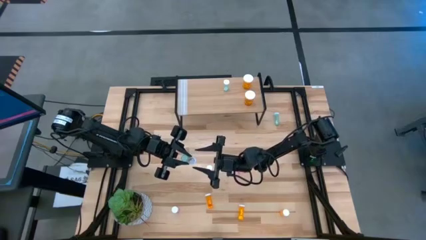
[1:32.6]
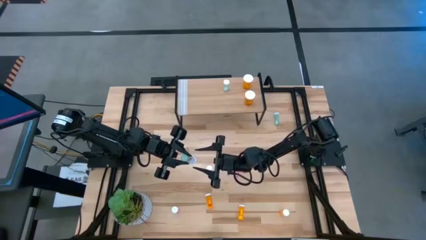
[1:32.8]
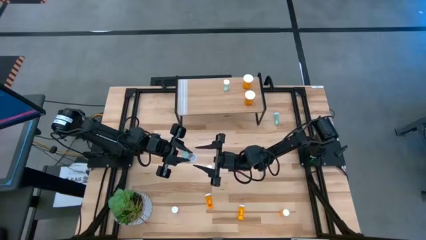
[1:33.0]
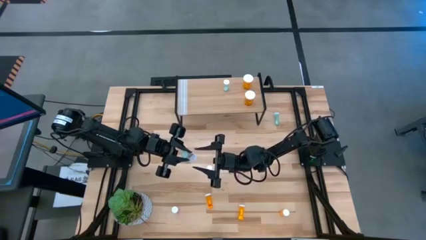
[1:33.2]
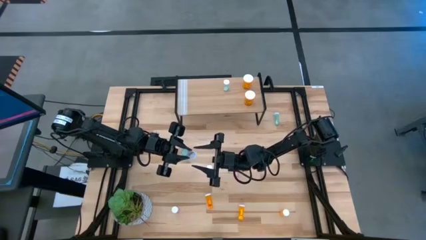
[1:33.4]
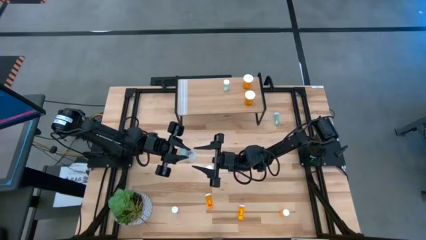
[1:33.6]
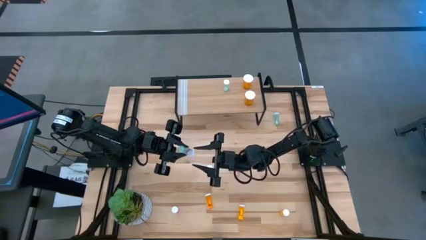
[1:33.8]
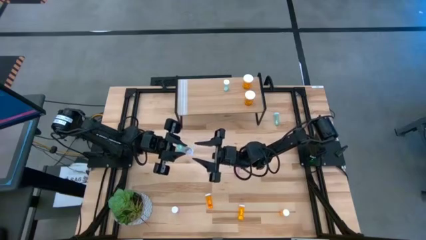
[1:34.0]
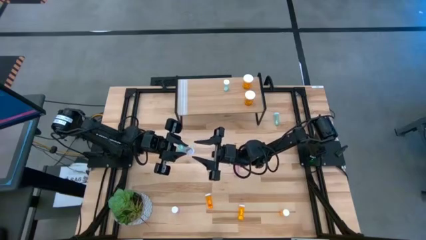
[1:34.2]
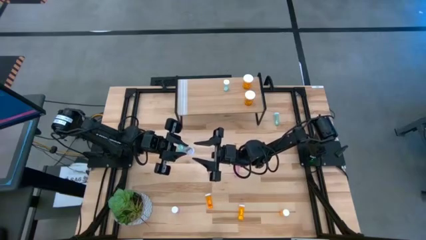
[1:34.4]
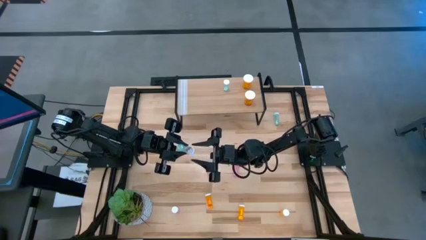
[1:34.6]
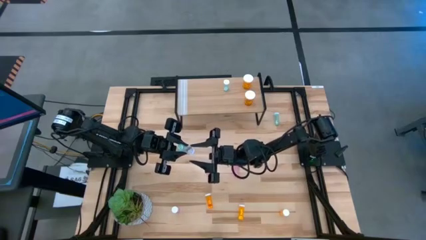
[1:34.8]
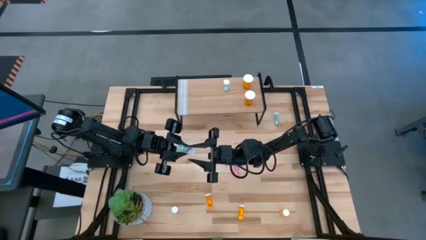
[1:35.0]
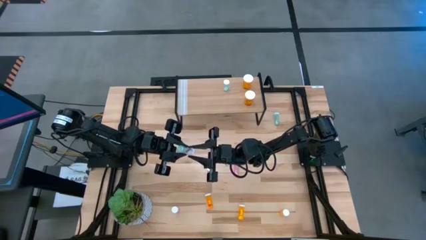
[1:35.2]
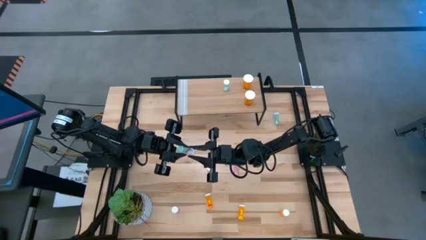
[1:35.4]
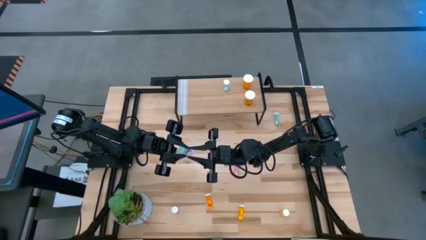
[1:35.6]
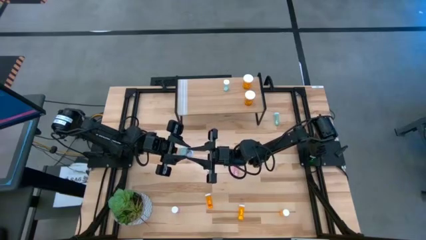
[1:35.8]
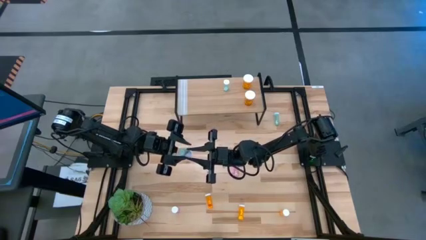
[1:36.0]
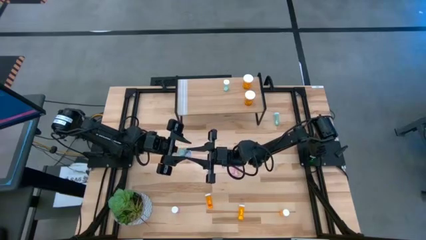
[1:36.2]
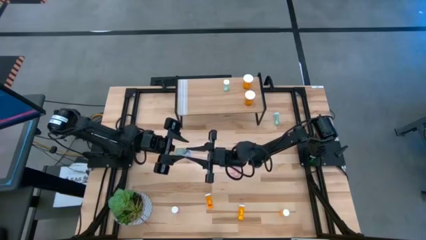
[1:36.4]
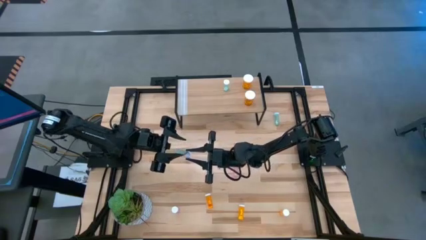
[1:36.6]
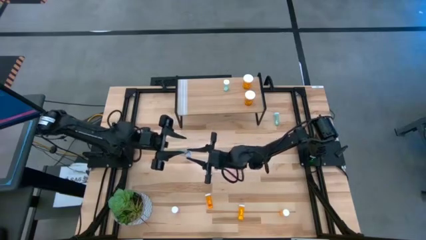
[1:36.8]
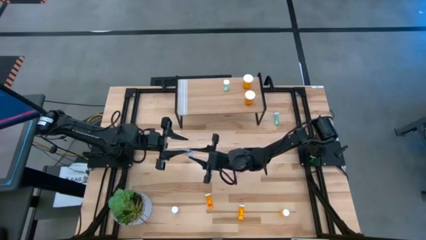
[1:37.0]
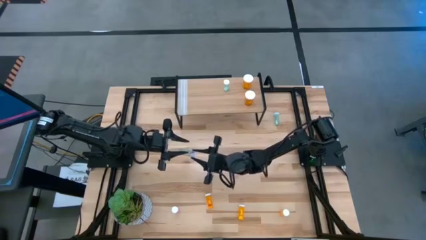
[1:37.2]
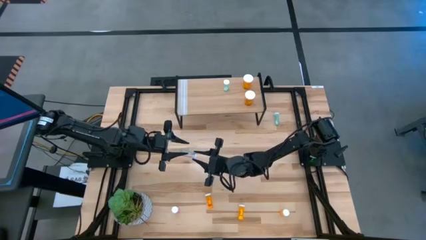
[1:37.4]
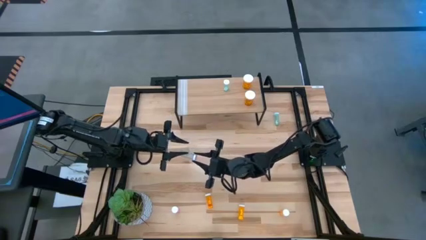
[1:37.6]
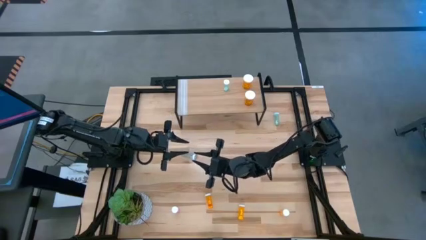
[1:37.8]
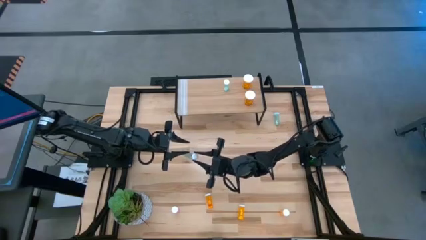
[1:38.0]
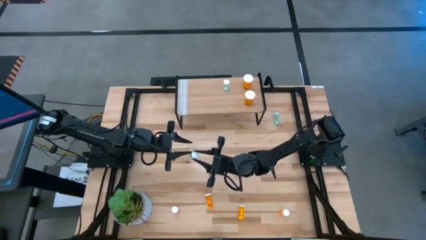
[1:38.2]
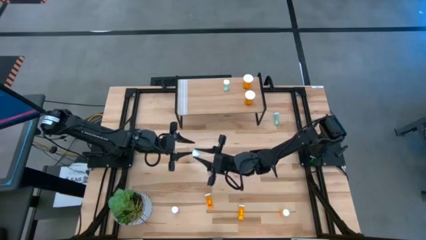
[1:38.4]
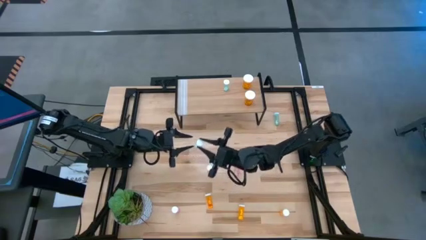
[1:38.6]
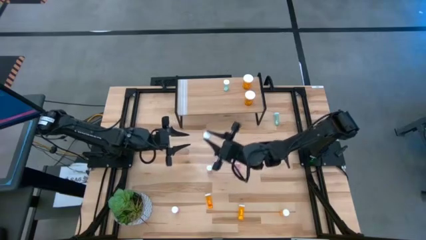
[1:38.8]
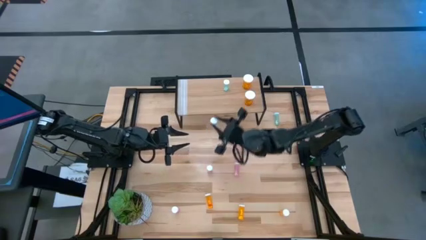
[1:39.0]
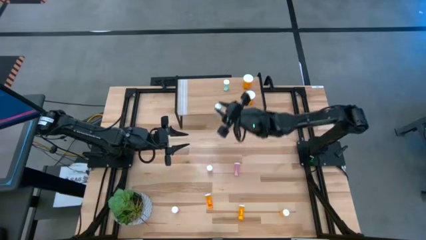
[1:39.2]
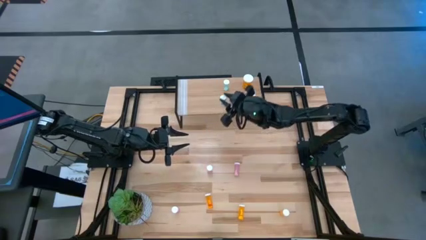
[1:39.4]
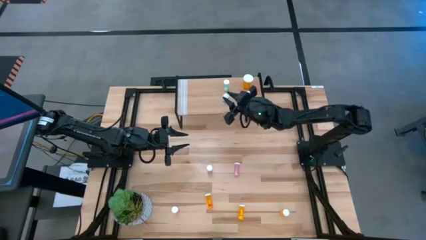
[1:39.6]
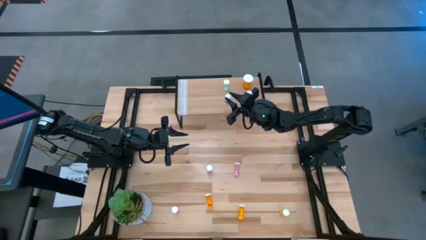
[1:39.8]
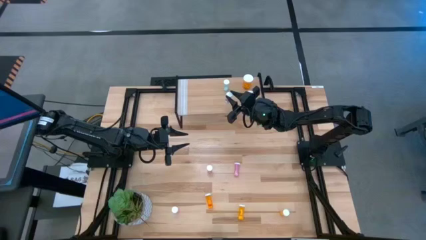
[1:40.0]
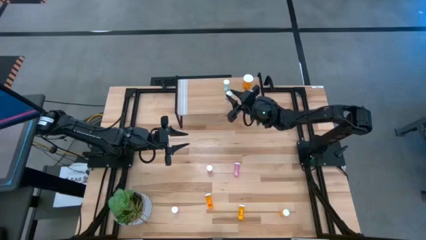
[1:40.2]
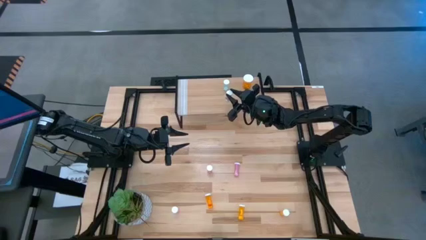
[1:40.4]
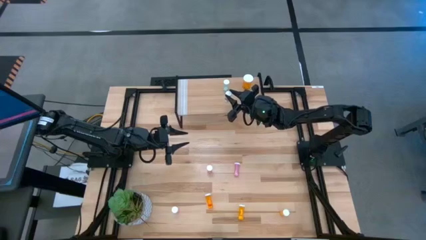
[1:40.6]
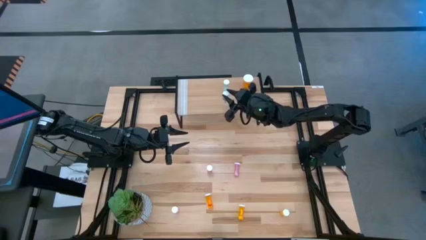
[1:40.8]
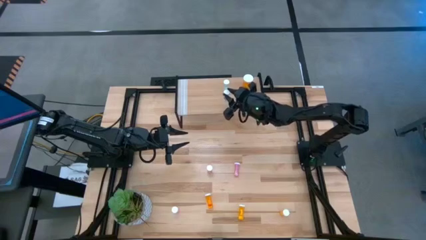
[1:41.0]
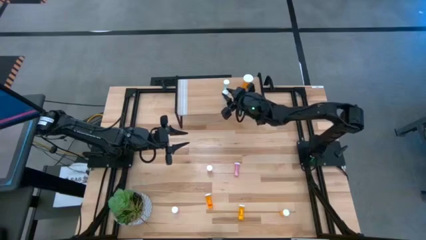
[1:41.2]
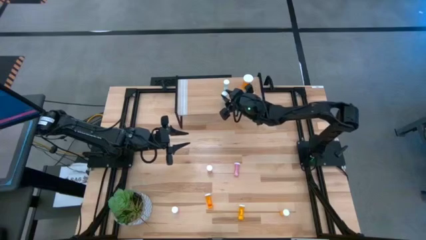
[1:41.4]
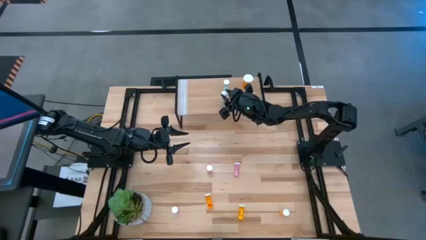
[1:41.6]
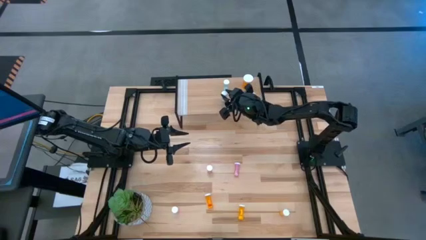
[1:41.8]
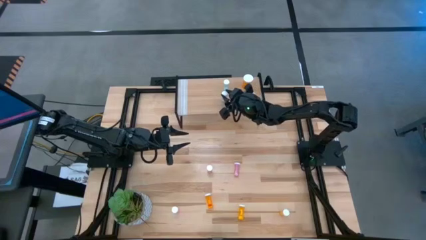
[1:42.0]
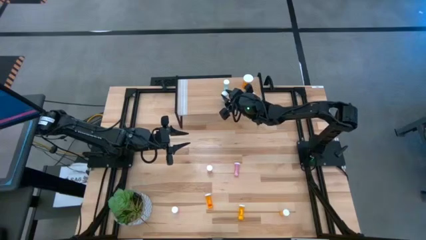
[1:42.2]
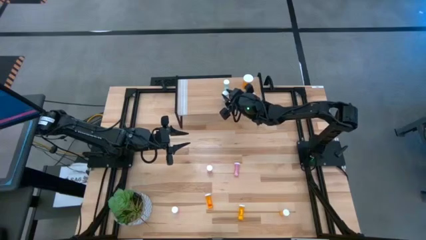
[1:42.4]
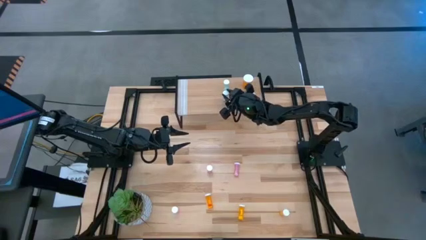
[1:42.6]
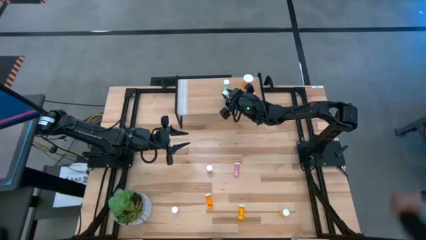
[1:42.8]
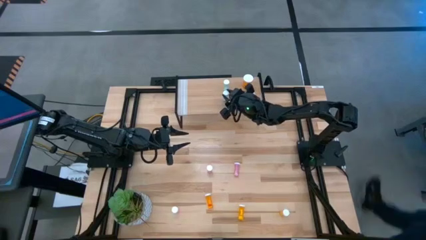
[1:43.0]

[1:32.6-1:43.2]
Task: Pick and place medicine bottles onto shelf by color
Put the left small blue pill bottle on the shelf aligned with the other small blue pill bottle

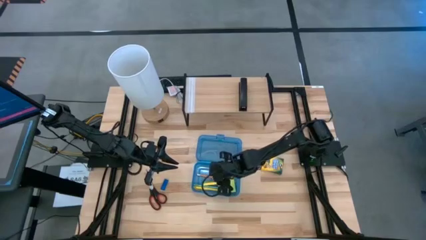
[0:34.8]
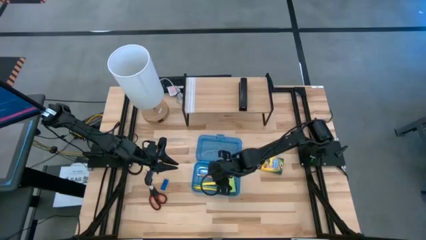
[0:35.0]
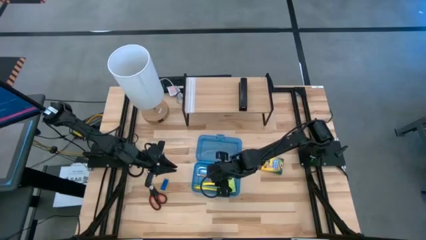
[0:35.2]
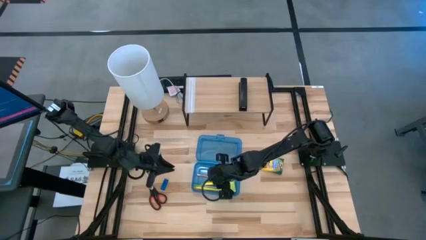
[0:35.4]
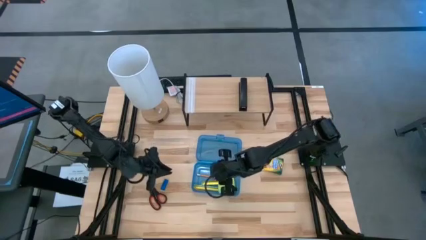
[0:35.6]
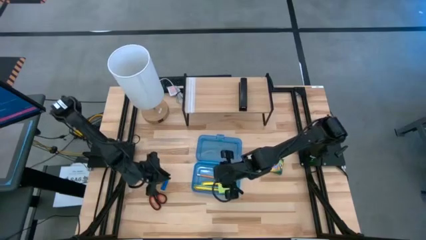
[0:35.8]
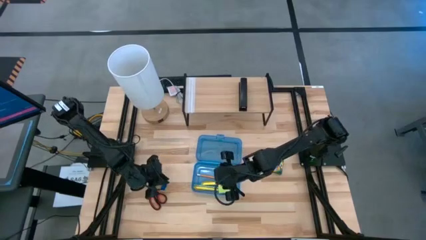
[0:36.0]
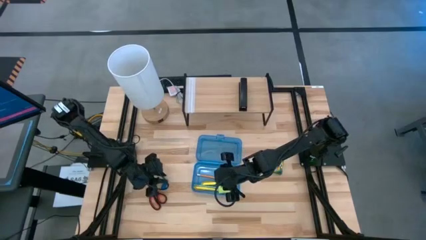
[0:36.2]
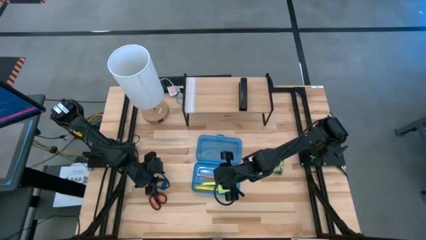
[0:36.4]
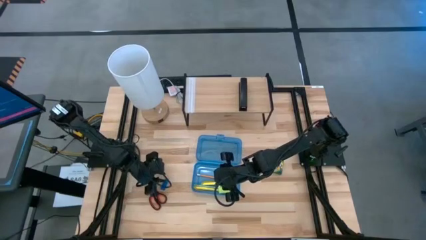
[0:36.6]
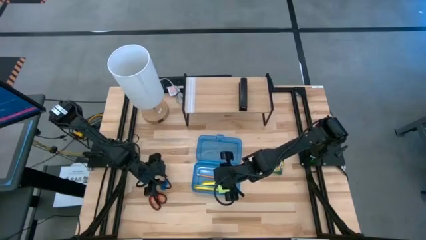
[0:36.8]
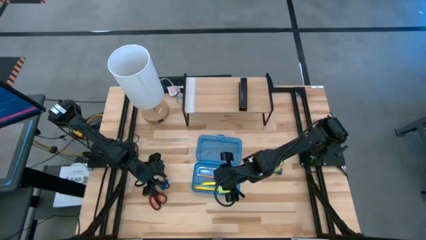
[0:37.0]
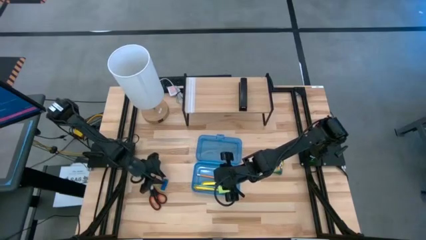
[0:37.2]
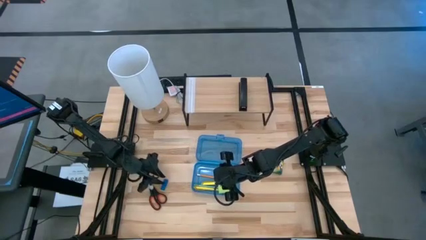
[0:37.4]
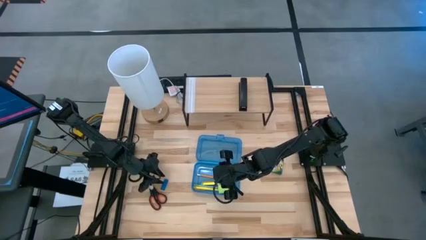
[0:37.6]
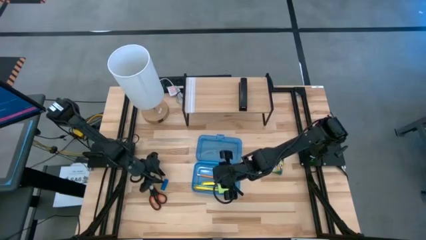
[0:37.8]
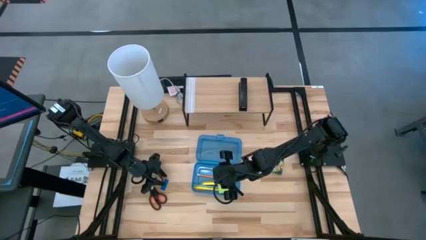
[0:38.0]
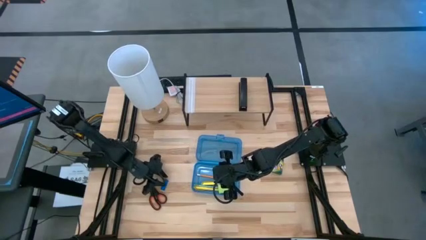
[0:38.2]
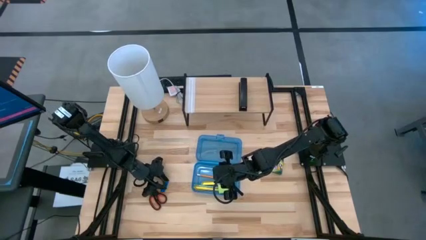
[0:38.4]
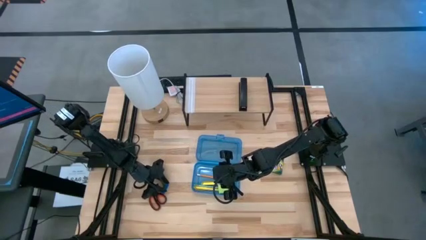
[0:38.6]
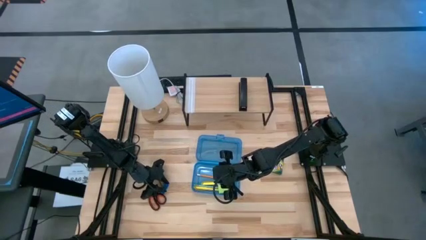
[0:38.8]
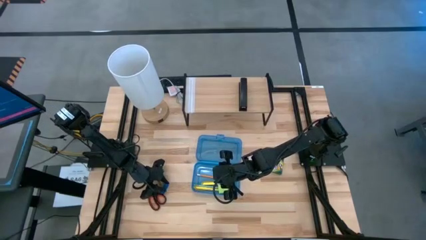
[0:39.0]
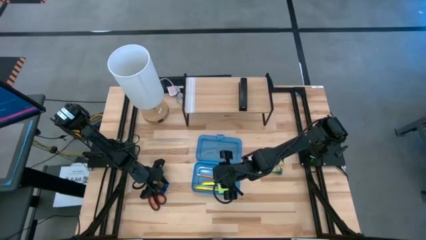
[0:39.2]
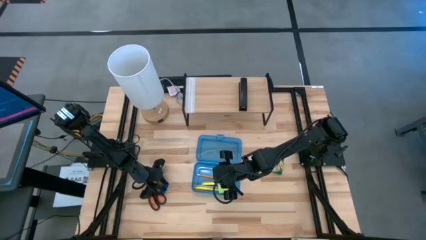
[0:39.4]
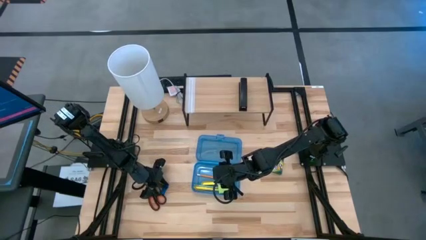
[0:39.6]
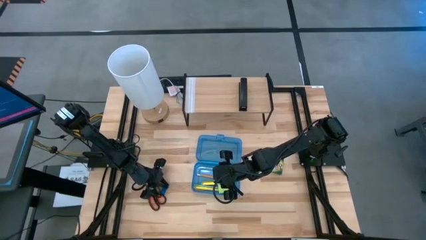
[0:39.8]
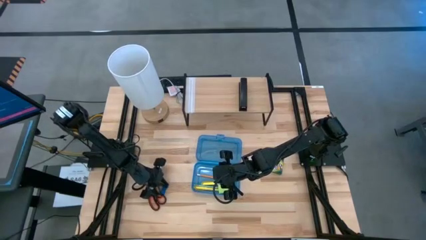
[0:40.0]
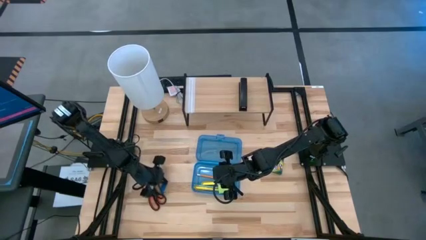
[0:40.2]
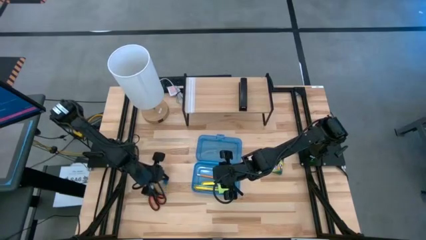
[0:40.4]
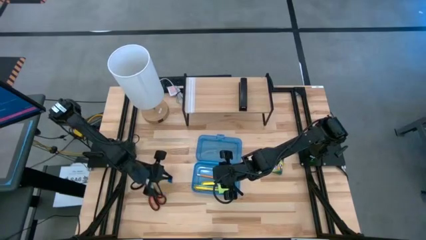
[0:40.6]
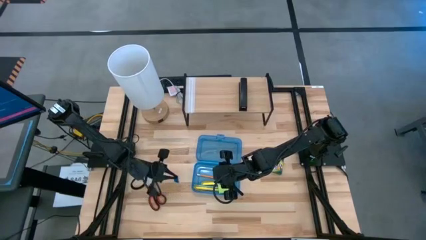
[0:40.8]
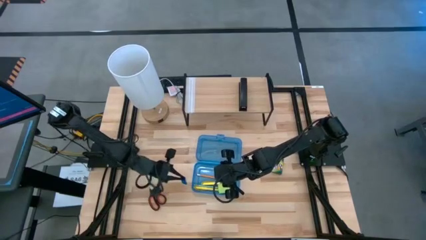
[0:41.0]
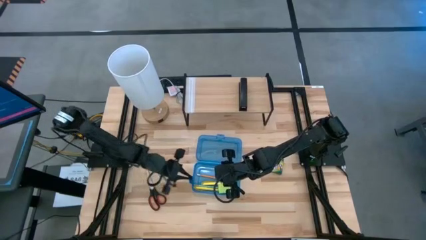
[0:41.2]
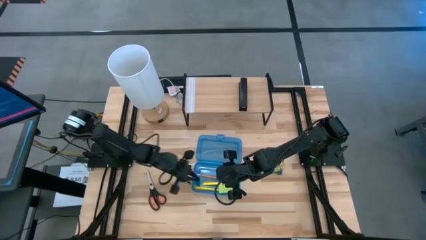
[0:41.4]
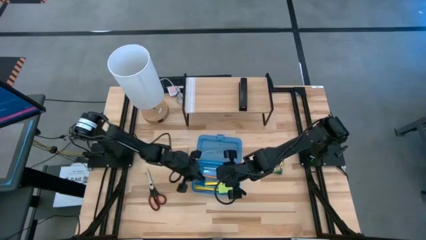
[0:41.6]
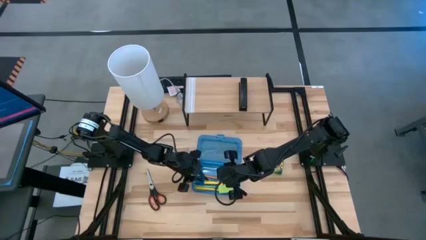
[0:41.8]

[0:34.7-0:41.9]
Task: Pack school essentials
Put the blue eraser into the blue supply box
